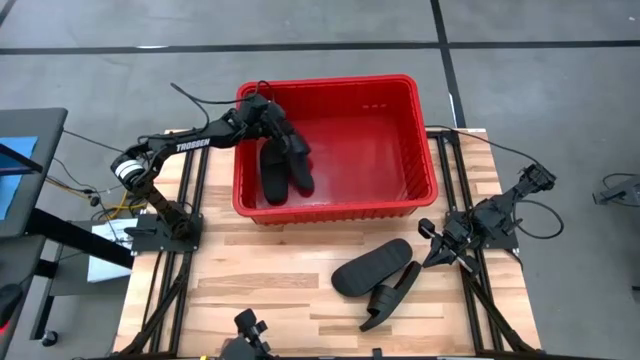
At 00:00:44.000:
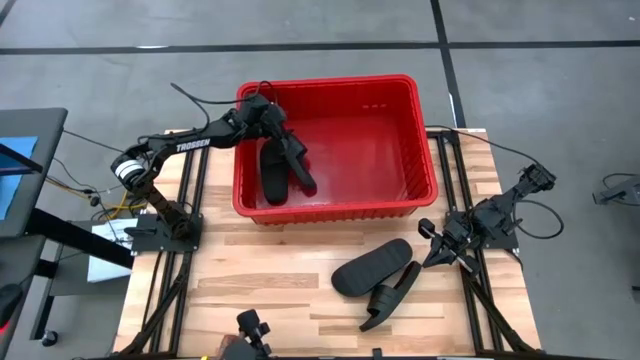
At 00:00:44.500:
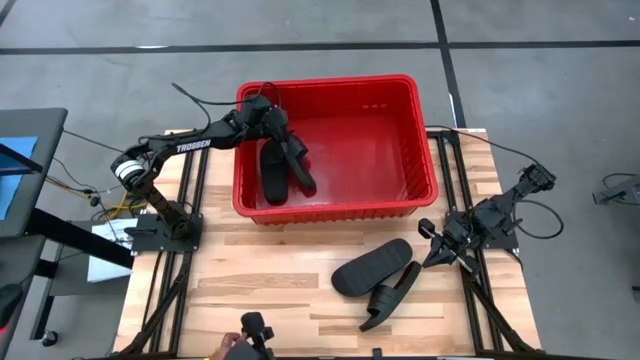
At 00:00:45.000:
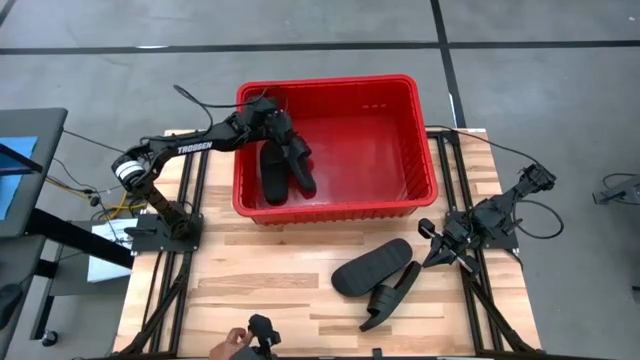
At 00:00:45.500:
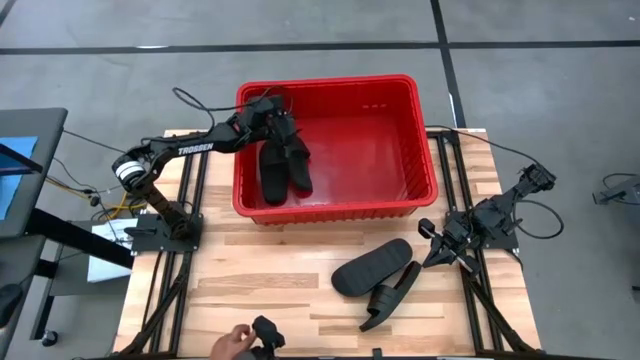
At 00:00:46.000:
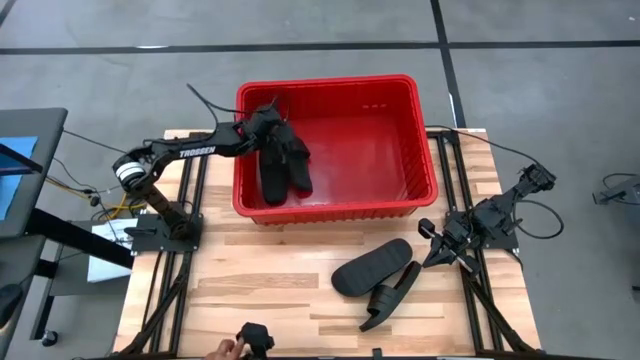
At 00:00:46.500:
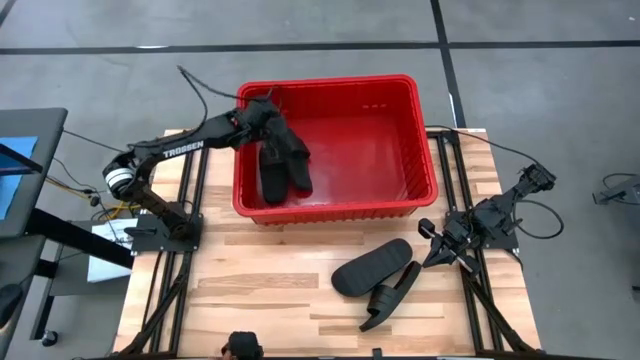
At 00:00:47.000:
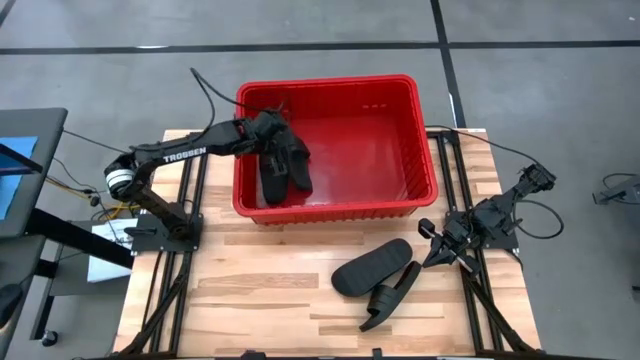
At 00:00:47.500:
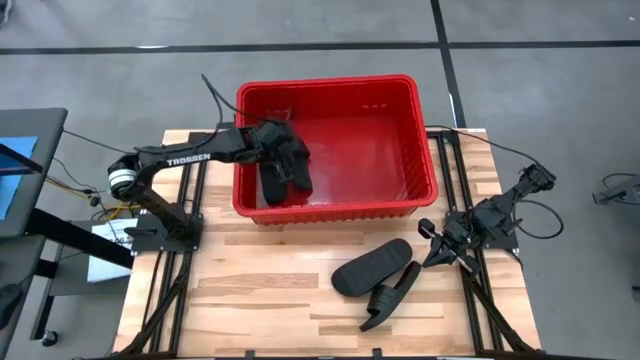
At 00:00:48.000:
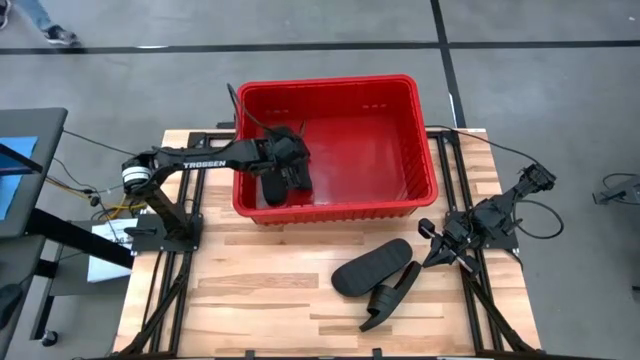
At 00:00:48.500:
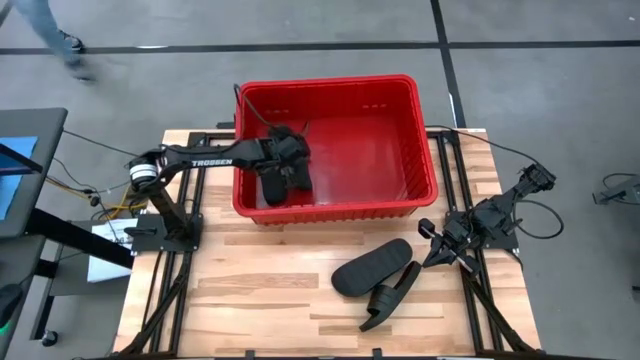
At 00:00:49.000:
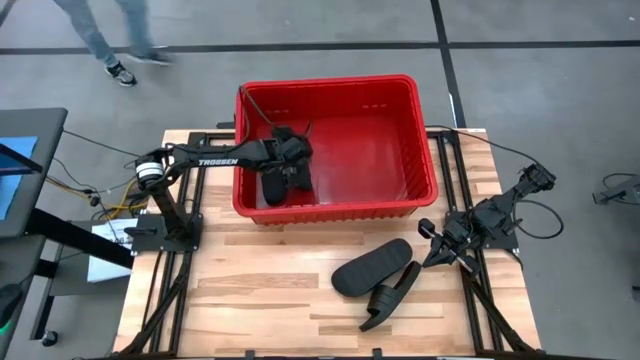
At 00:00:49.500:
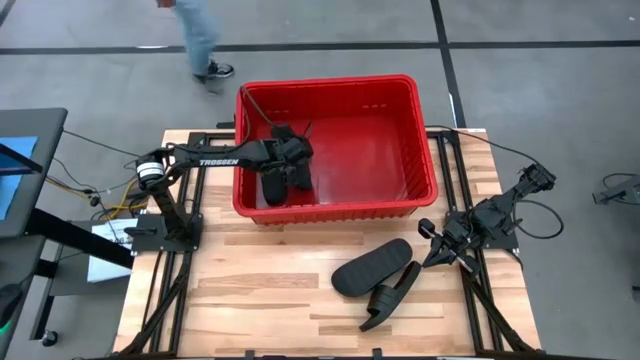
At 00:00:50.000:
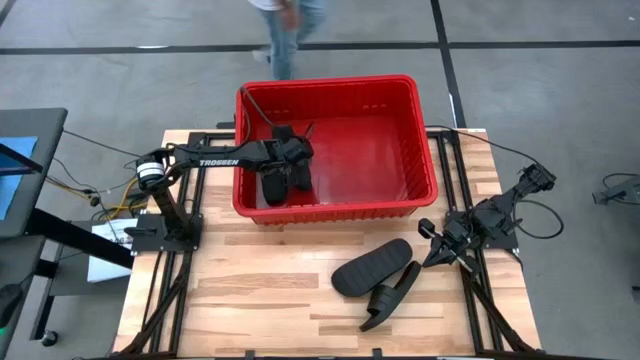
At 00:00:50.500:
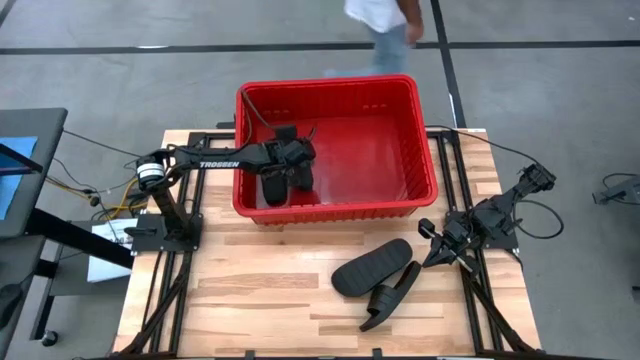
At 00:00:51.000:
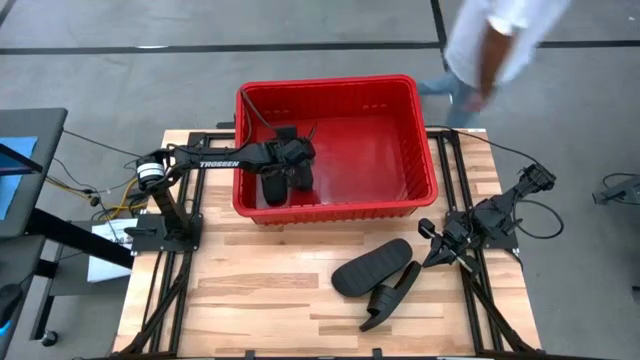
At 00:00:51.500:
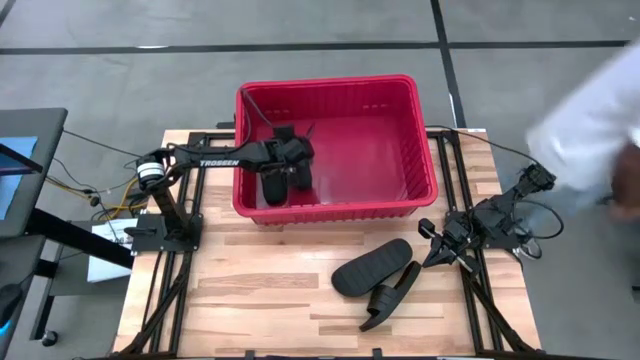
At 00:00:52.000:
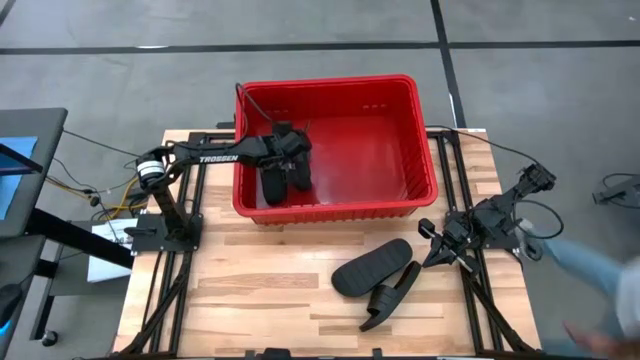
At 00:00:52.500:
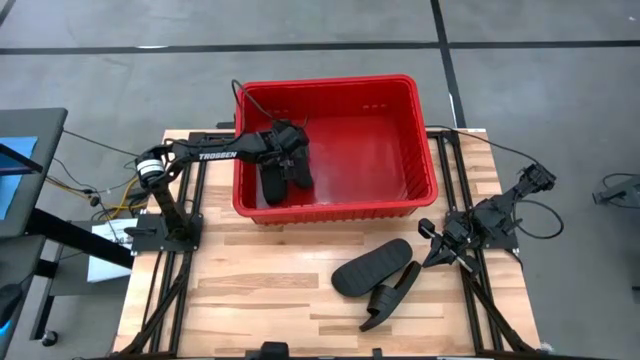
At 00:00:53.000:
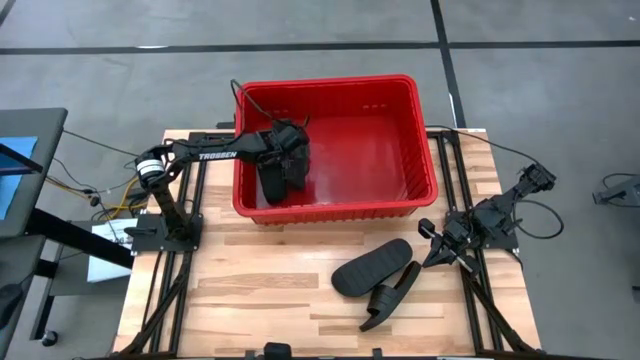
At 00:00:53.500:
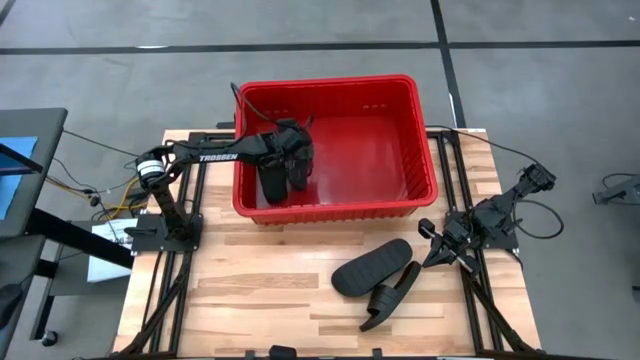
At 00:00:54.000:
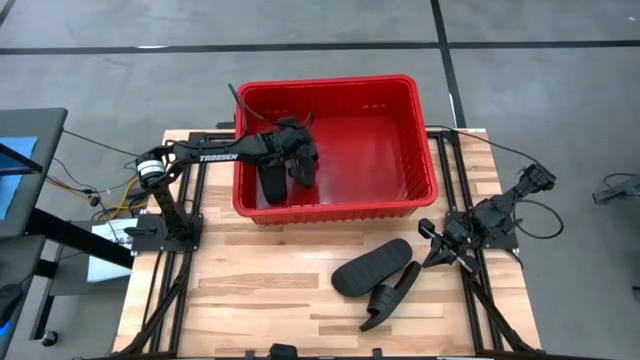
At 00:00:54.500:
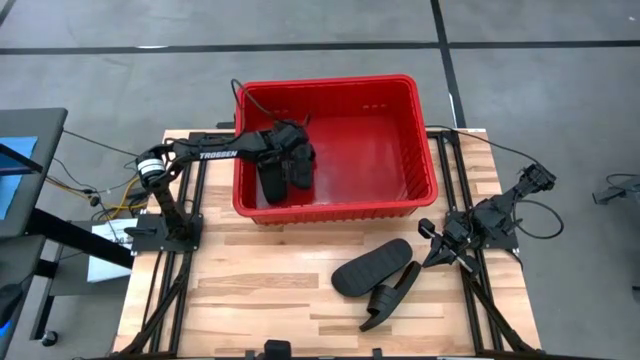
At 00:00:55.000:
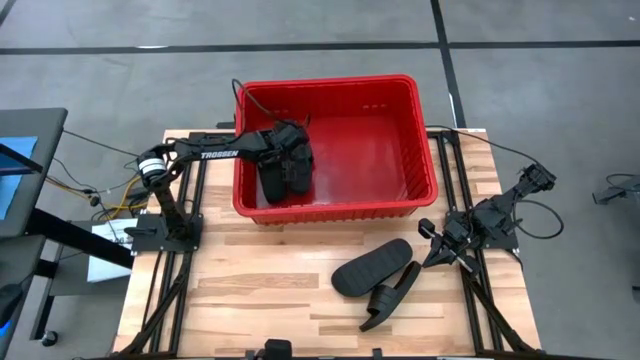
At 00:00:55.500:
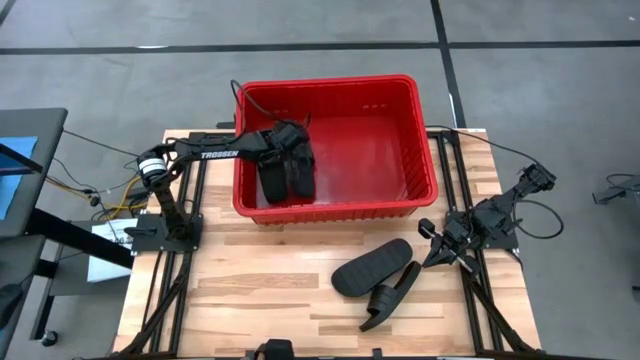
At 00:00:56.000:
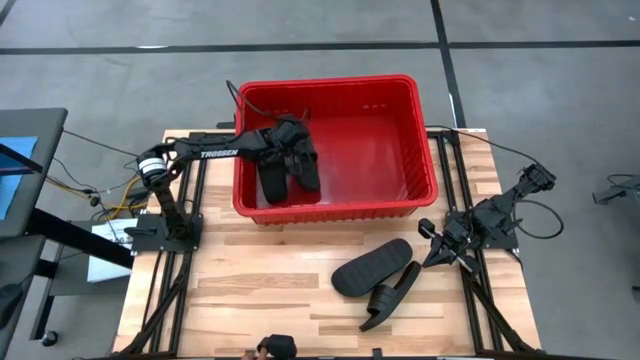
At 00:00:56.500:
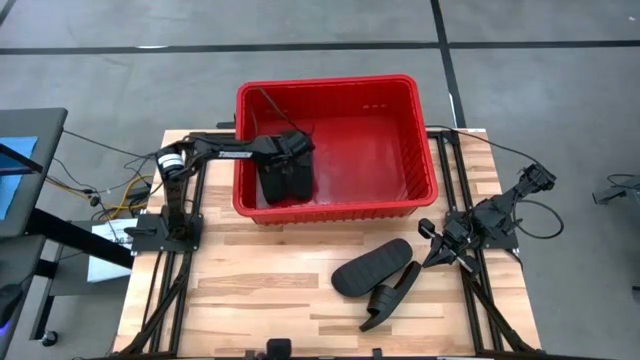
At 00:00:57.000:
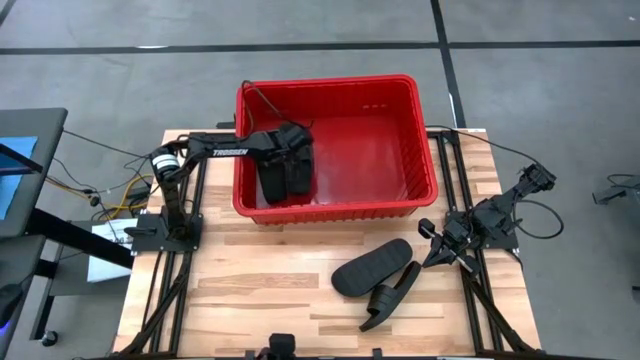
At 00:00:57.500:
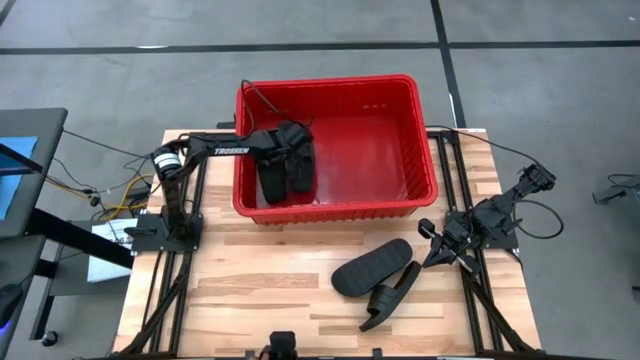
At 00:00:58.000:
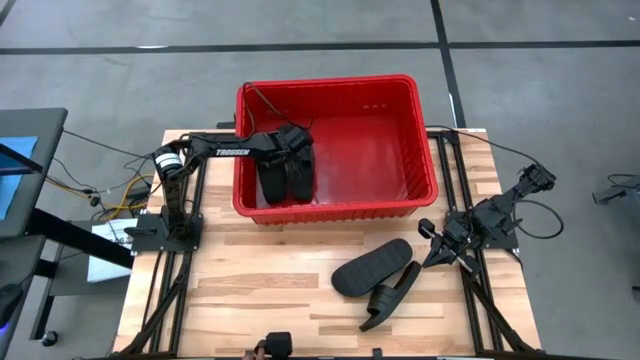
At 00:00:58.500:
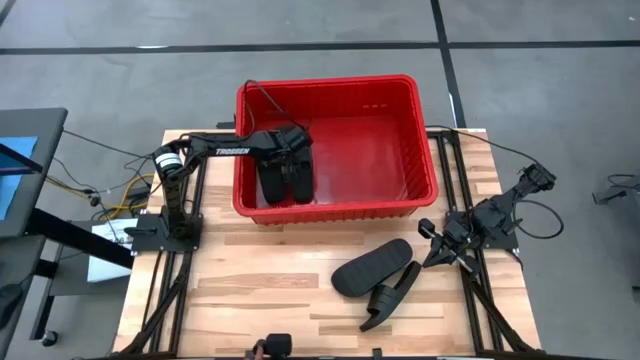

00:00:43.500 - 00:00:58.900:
Task: Pick and place slides into bin
Adjust the black slides in the red bin

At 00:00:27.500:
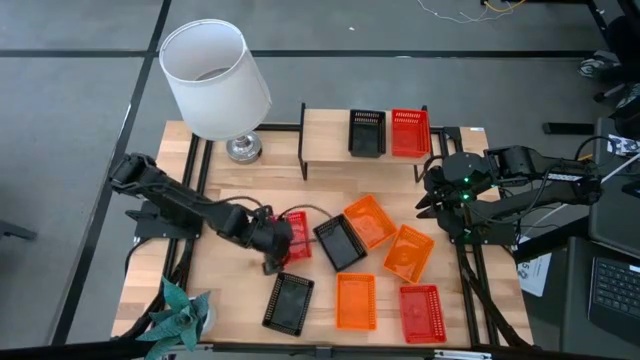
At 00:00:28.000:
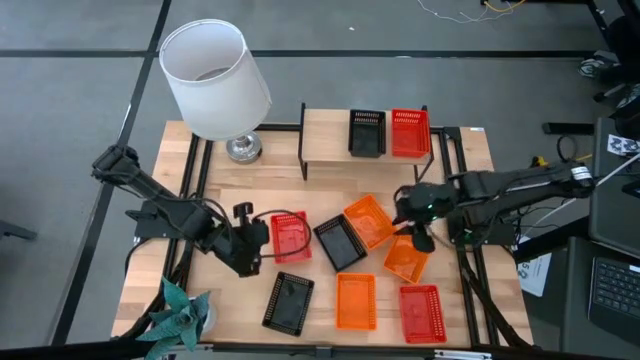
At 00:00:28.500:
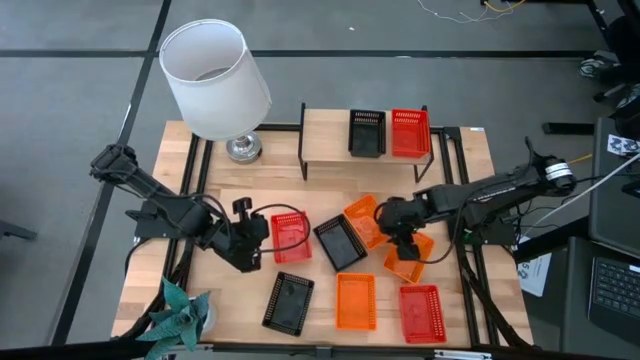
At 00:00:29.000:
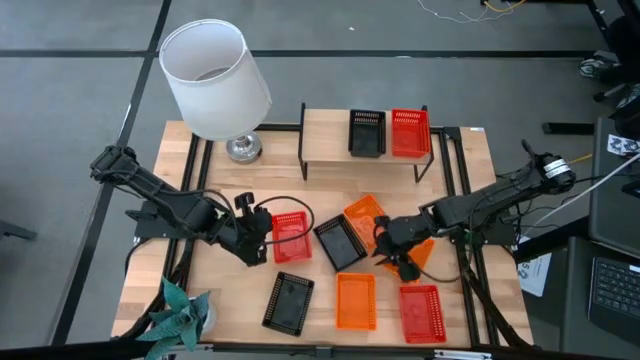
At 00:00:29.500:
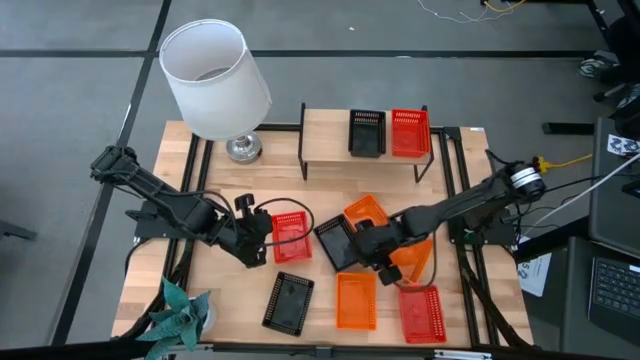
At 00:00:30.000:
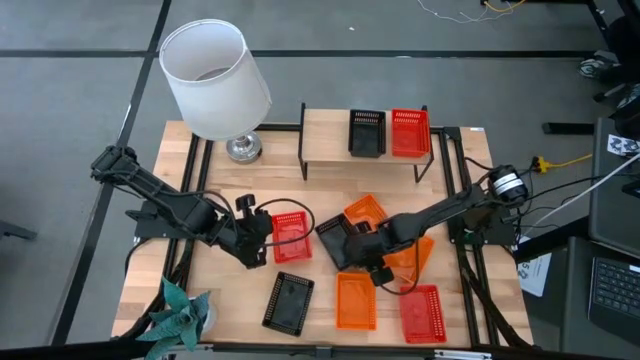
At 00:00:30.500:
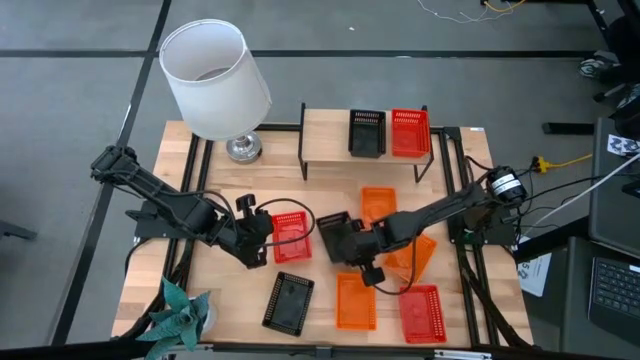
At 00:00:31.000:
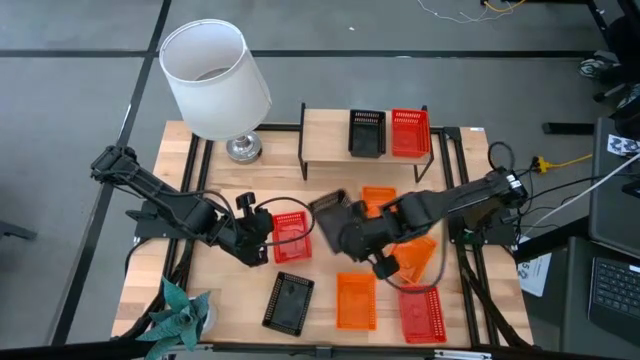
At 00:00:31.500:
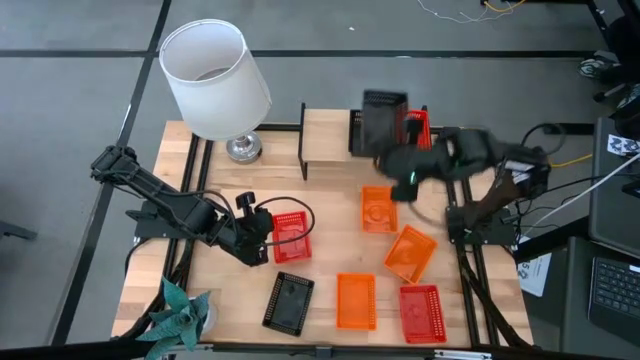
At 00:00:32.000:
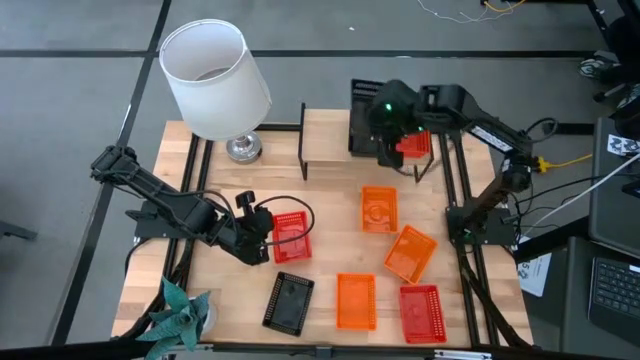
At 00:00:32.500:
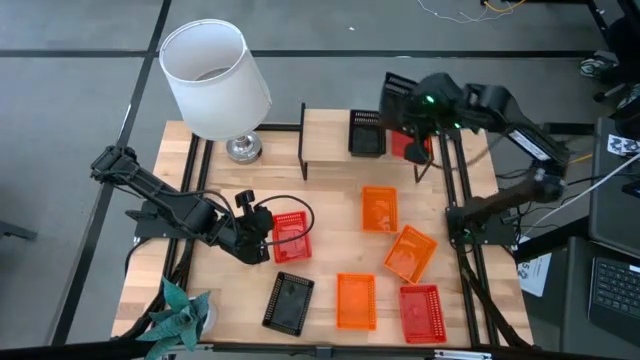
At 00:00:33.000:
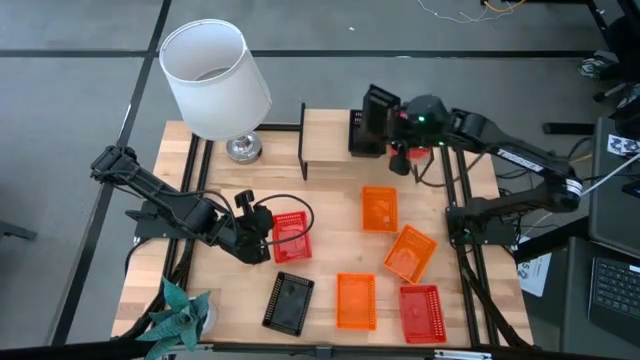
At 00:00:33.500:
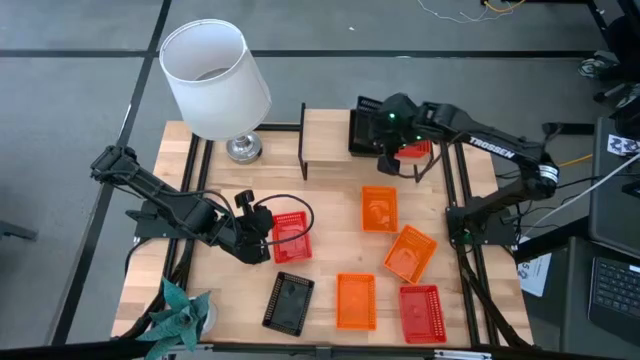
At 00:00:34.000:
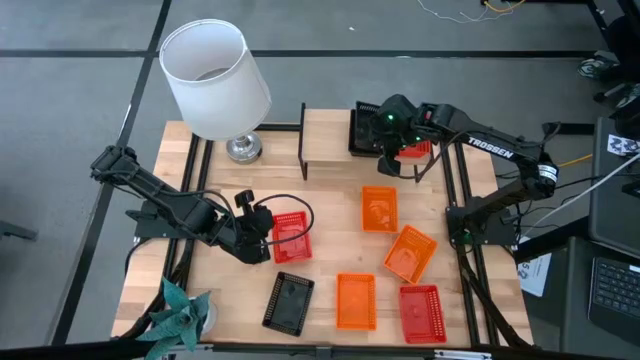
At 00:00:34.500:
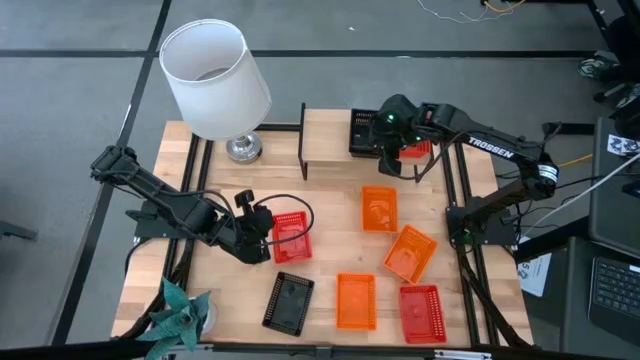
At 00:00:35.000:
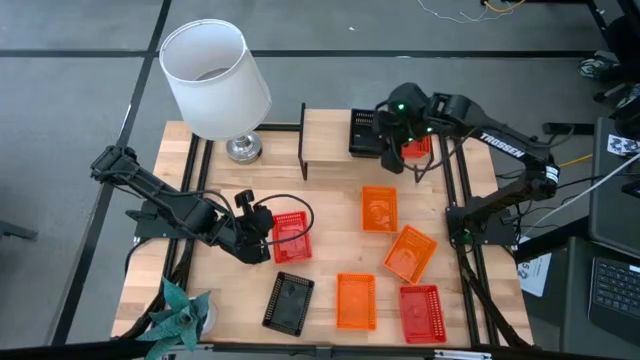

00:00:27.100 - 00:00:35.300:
Task: Stack baskets on shelf by color
Stack the top black bin on the black bin on the shelf
